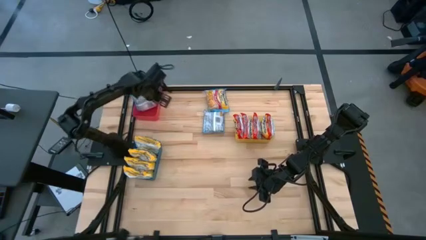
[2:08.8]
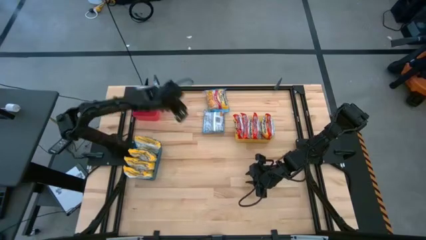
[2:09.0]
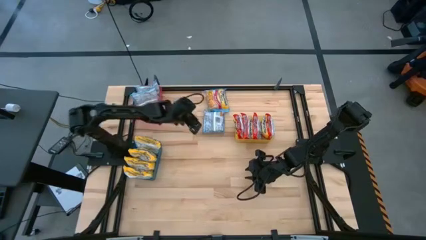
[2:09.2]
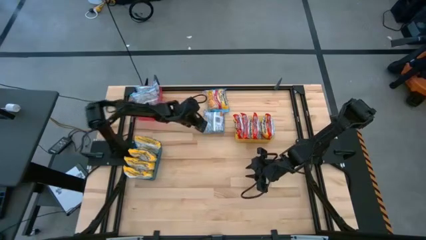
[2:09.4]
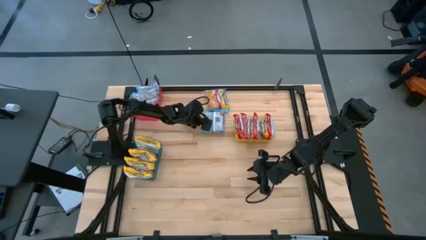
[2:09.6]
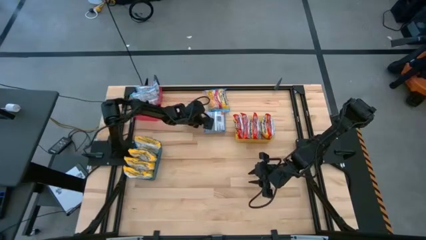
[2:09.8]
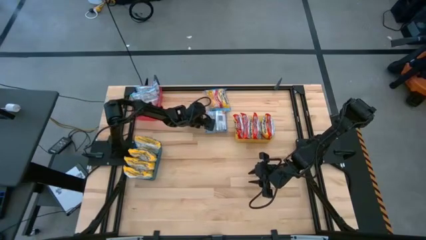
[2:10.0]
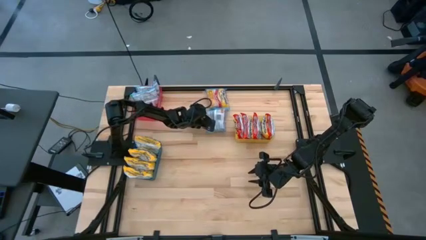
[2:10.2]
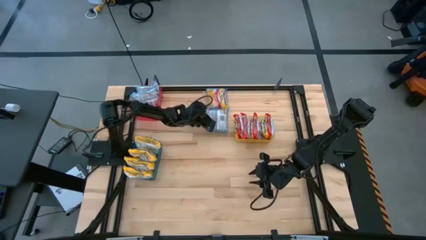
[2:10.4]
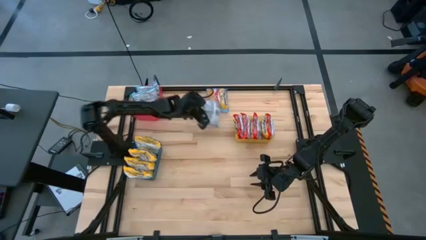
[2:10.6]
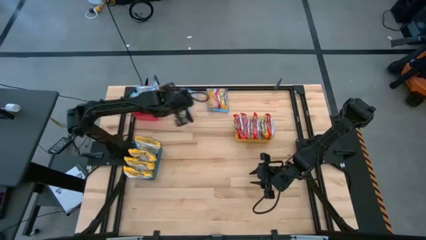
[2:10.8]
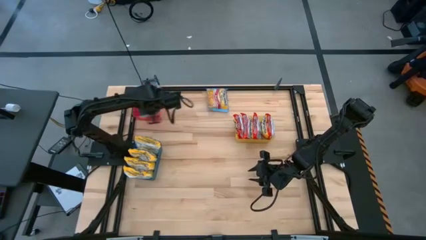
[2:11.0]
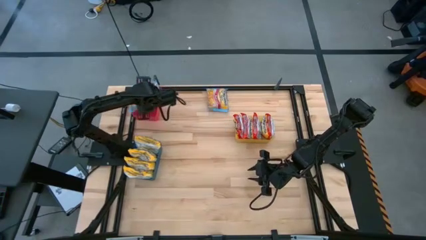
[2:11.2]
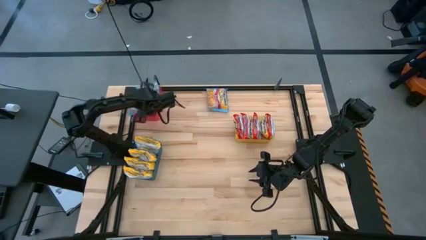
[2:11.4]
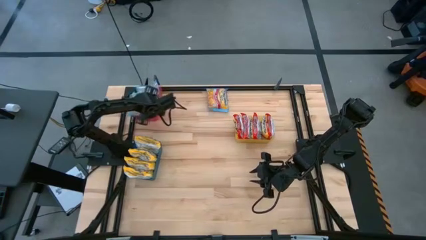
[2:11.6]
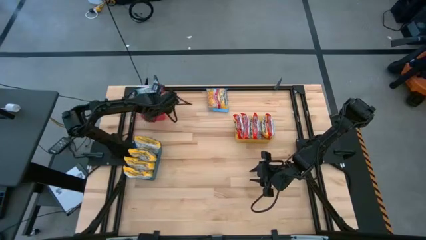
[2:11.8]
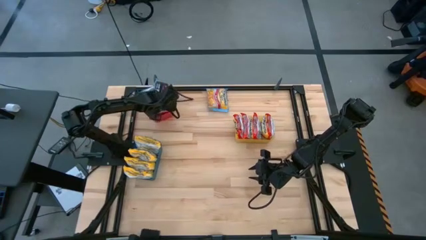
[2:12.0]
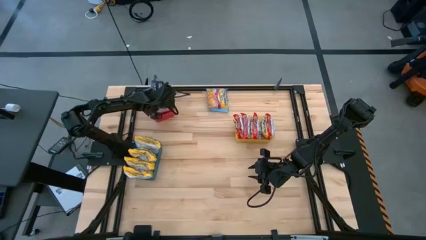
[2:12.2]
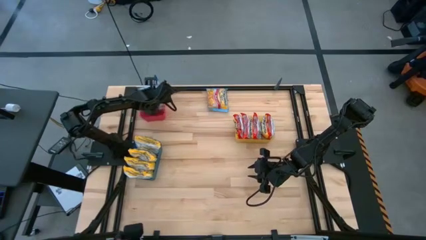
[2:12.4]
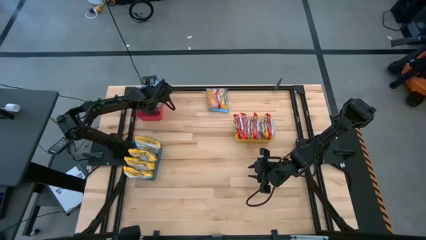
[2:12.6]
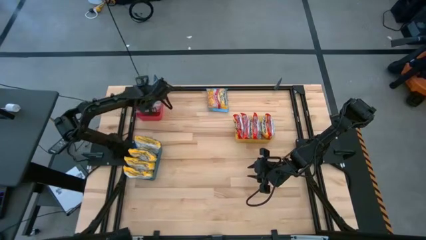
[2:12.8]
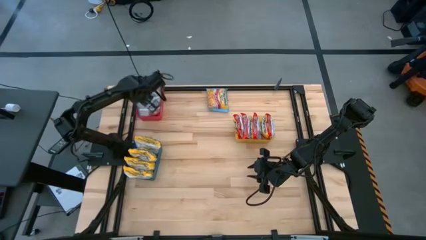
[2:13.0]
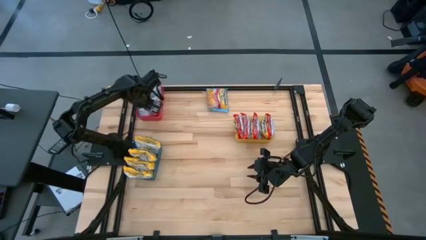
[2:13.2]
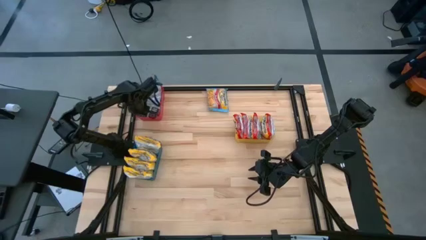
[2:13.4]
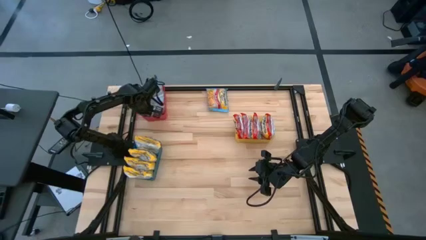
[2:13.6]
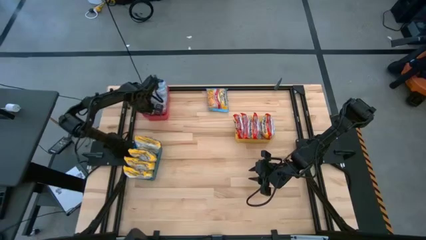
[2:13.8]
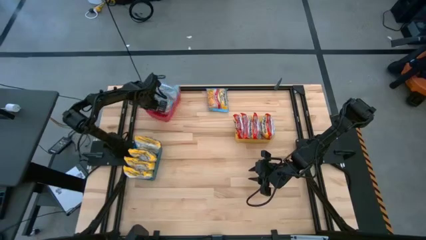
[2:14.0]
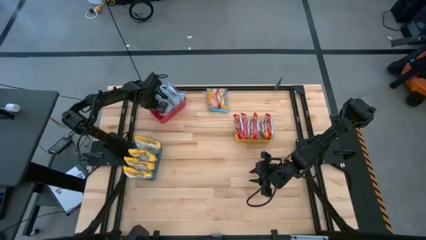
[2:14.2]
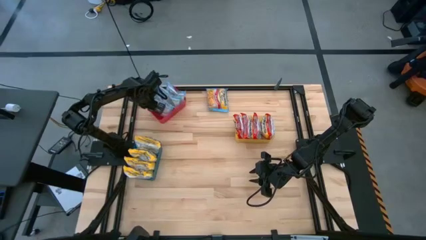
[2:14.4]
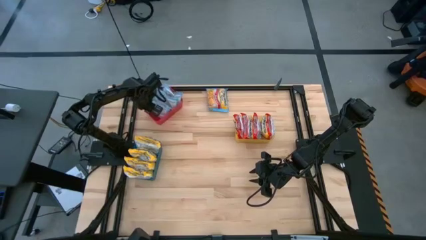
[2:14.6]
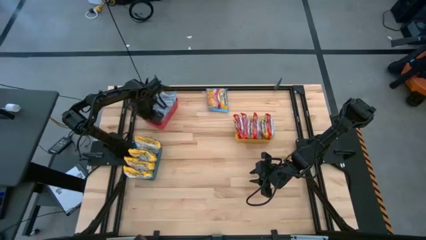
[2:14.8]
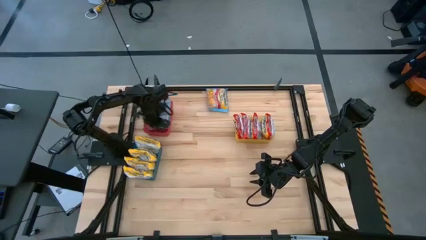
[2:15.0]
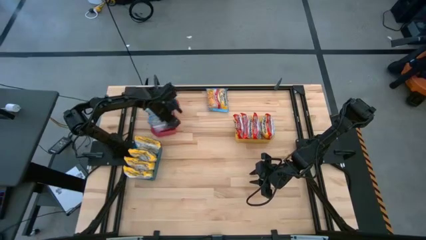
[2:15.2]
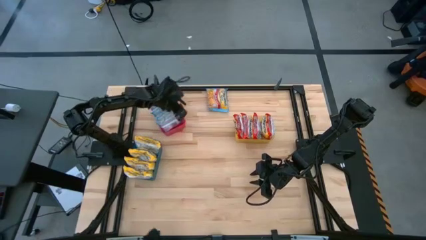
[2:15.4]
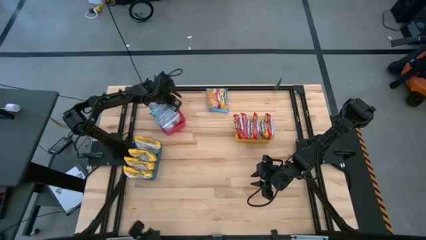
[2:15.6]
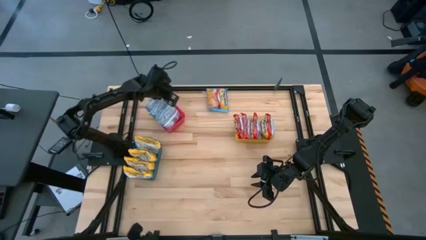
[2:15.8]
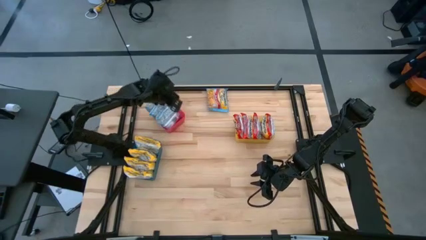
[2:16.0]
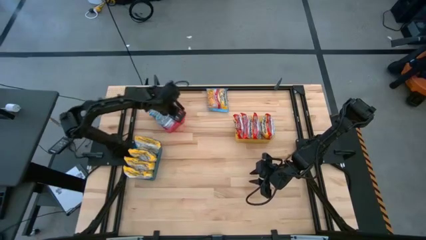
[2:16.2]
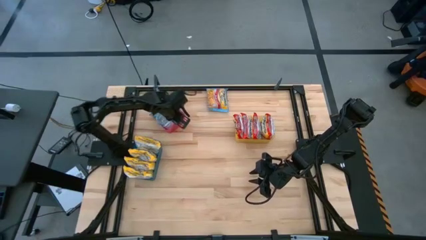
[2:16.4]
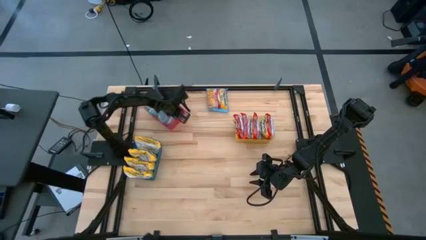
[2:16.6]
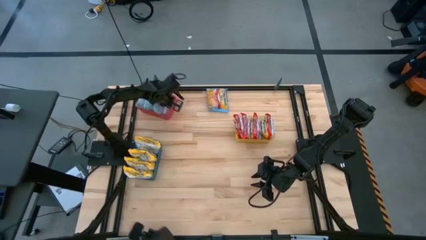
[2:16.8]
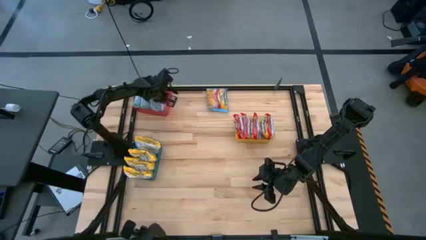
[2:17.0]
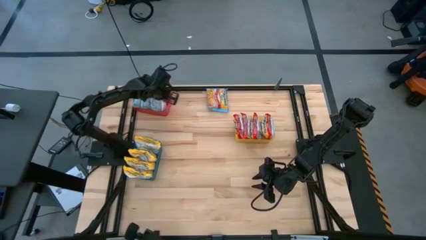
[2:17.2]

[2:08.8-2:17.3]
Task: Sort Maruchan noodles
Put the blue noodle pack into the red bin

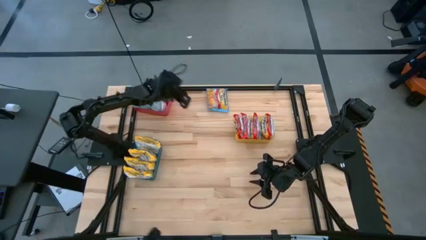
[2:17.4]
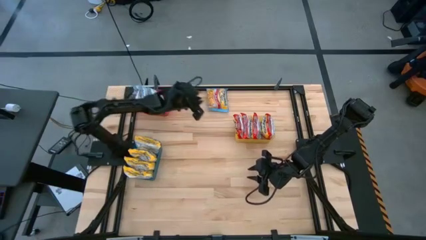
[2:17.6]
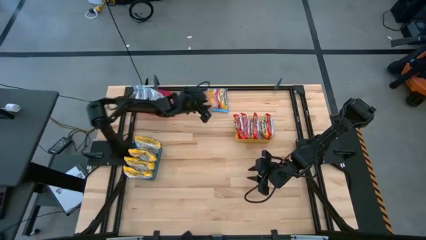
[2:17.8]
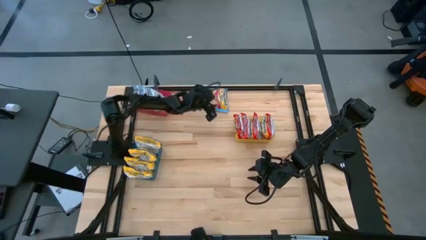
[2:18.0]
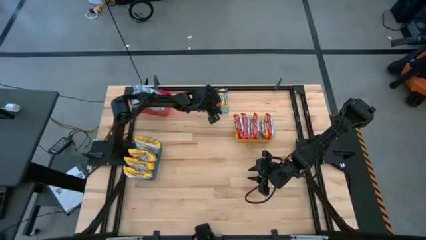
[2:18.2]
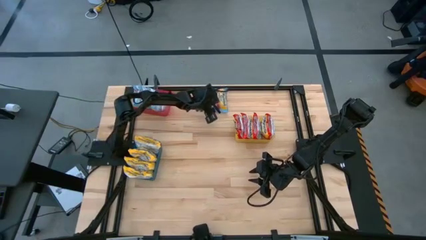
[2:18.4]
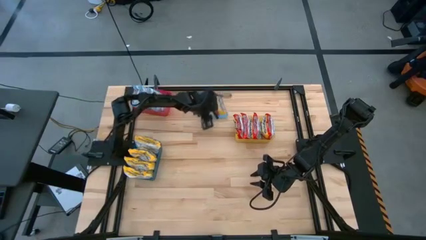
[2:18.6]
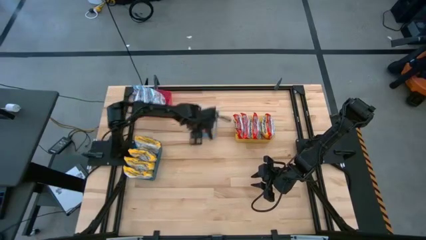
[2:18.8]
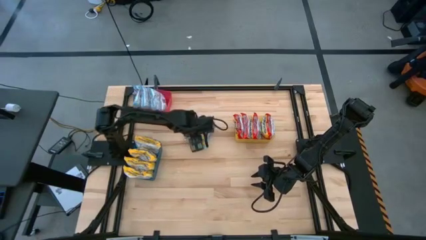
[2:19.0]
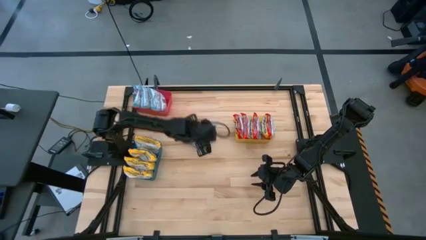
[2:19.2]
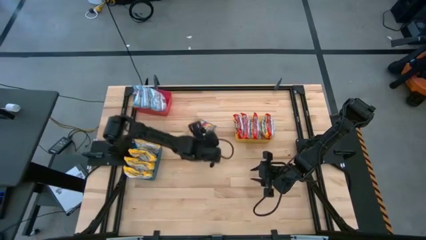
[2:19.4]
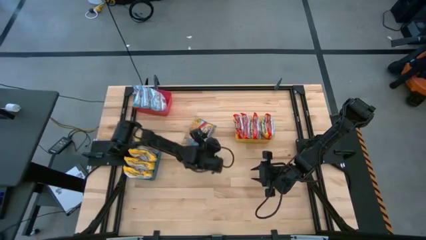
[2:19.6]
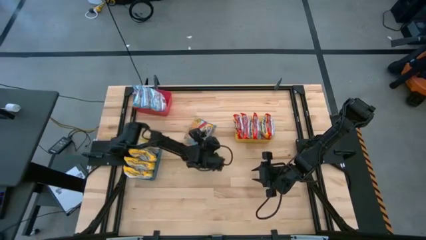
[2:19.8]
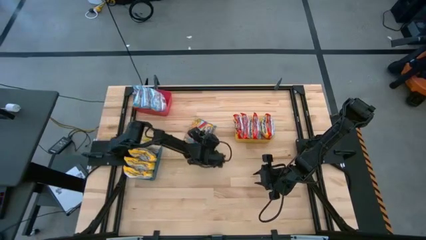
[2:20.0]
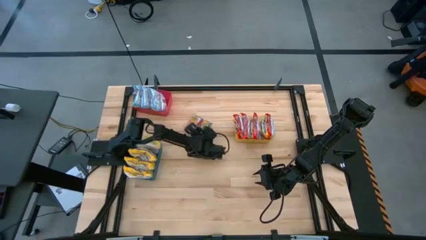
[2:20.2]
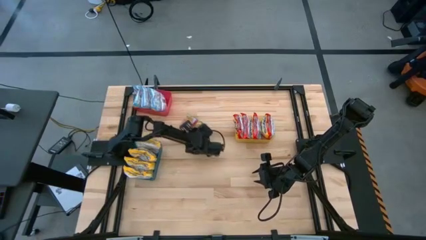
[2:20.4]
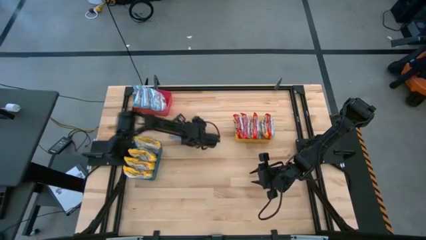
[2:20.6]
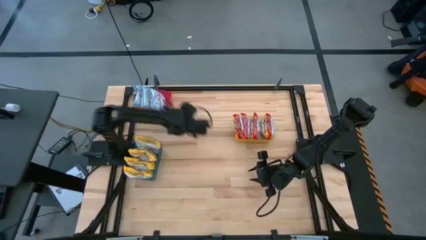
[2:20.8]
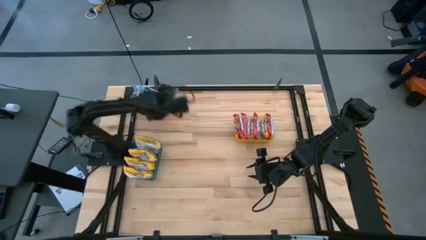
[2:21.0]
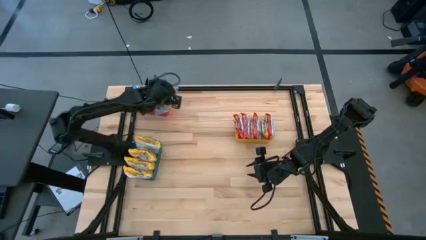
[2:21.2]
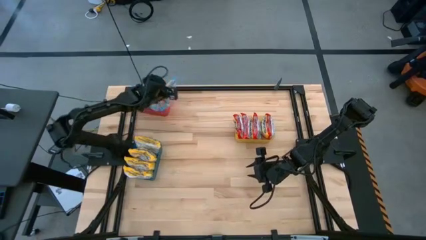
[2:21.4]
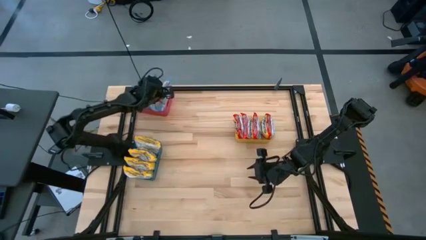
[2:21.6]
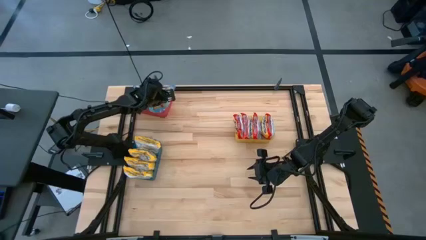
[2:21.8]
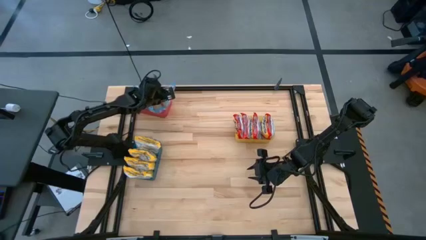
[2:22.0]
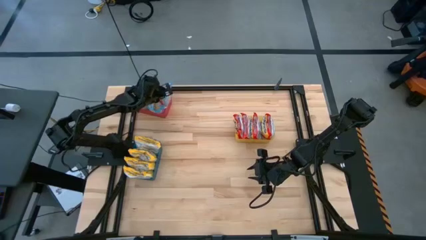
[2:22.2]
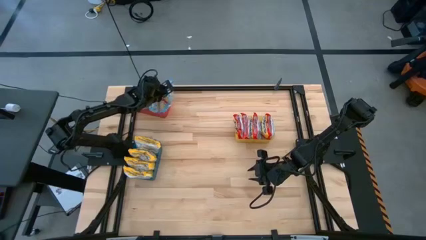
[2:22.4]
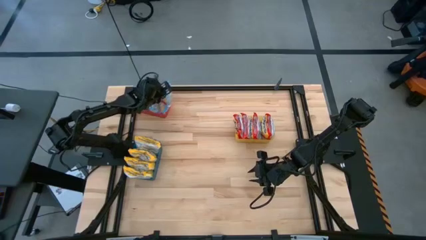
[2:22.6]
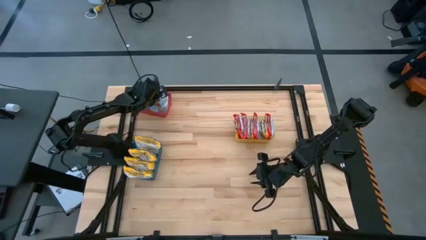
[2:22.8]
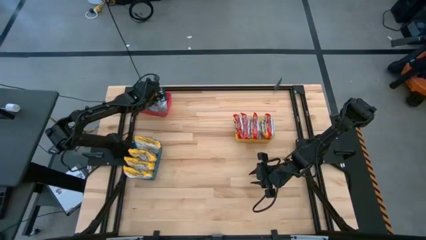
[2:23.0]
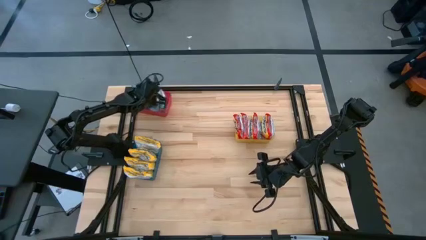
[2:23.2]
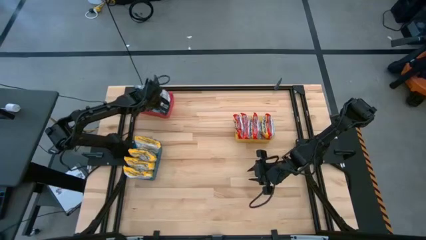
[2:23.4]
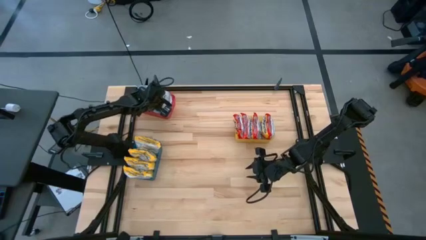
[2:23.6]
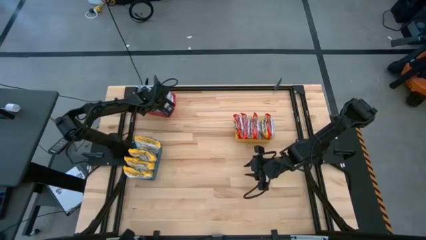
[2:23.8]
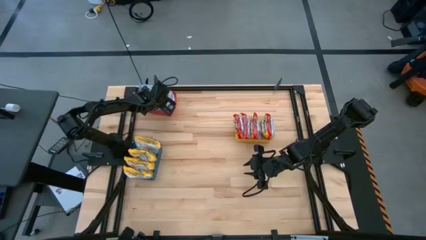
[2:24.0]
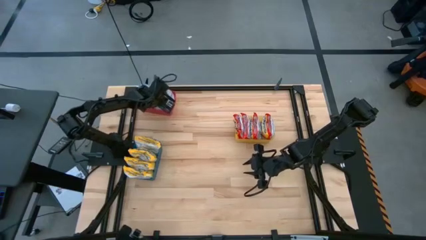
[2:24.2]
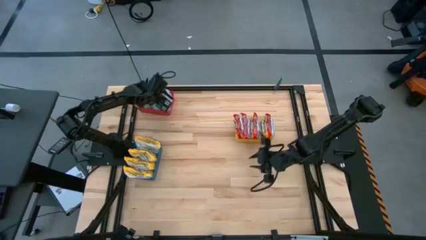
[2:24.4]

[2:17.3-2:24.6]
Put the blue noodle pack into the red bin

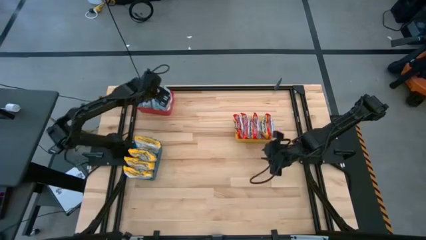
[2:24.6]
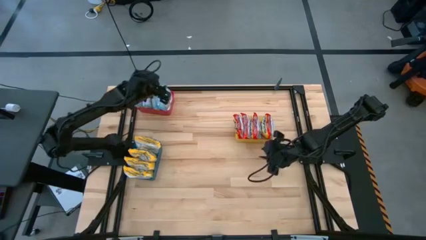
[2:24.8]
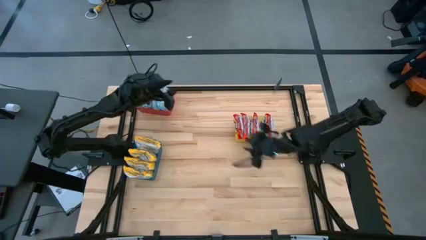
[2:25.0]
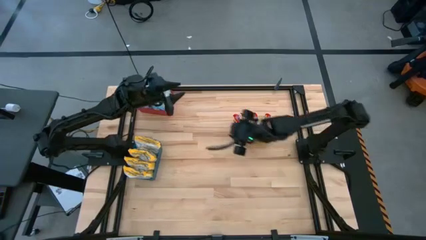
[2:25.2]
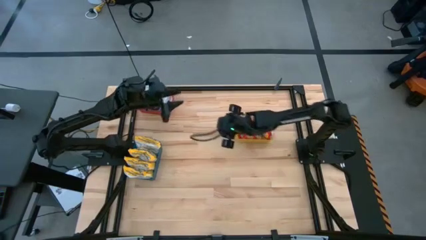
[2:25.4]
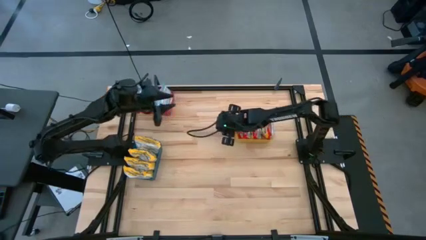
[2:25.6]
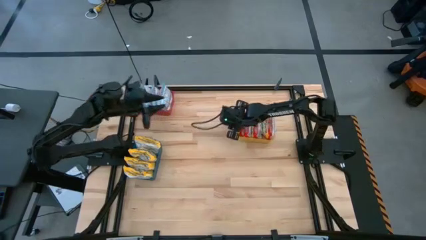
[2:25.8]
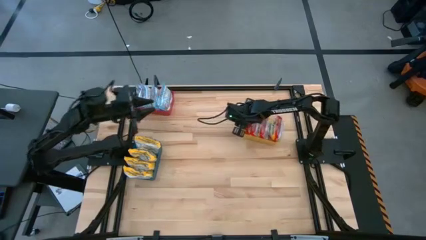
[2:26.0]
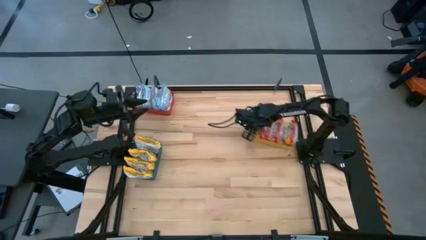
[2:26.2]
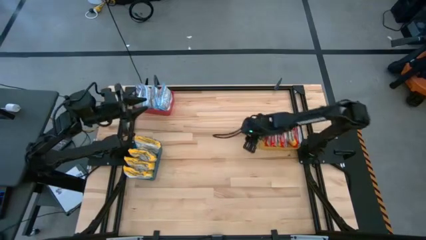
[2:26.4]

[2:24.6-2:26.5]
Adjust the yellow bin
